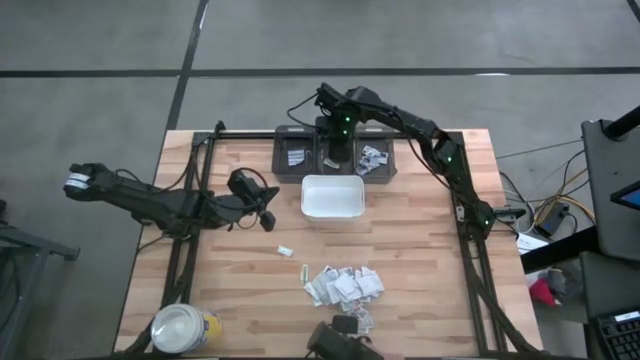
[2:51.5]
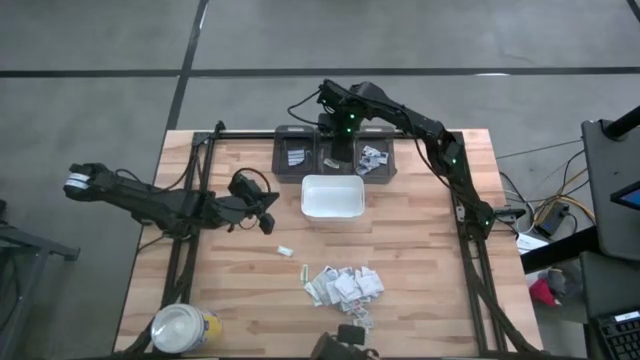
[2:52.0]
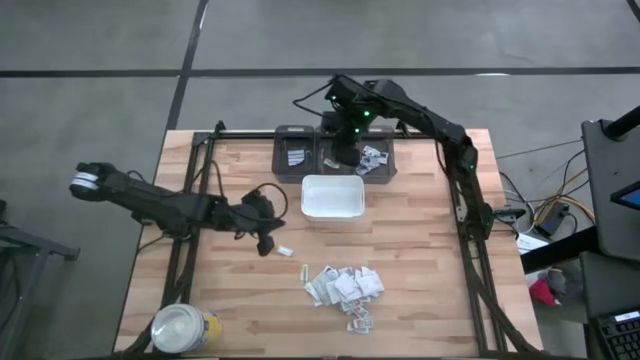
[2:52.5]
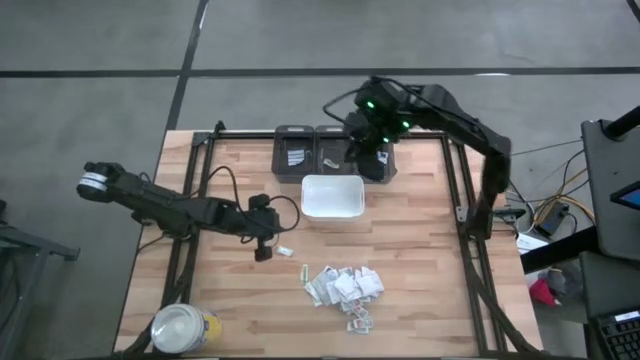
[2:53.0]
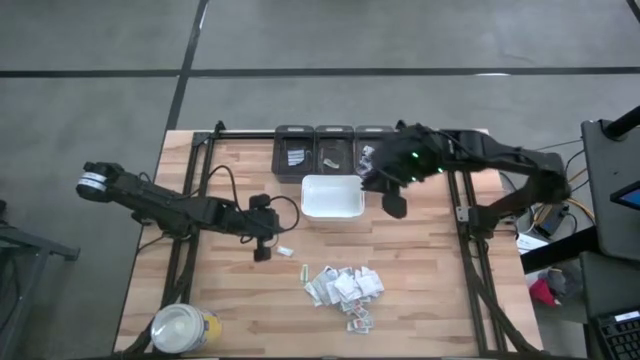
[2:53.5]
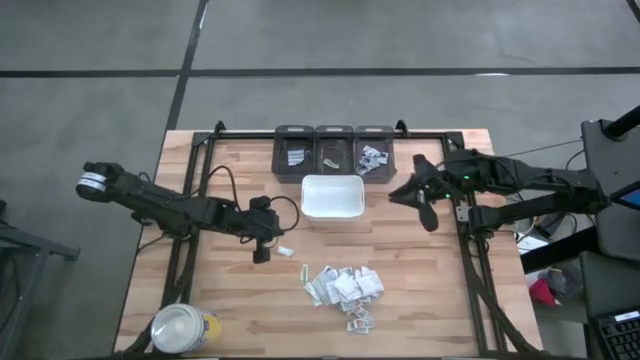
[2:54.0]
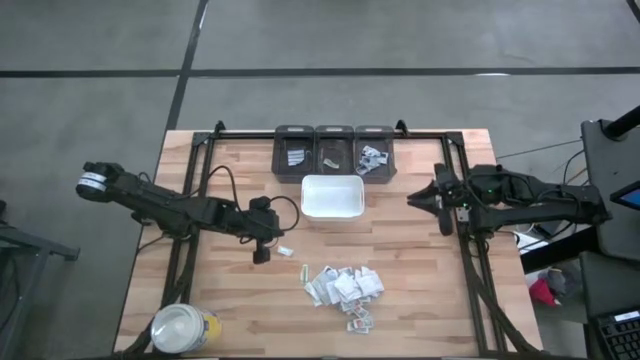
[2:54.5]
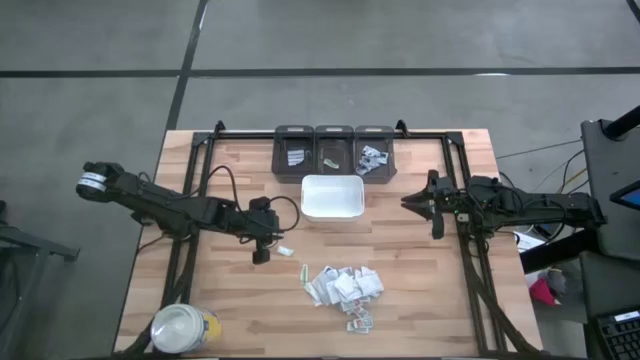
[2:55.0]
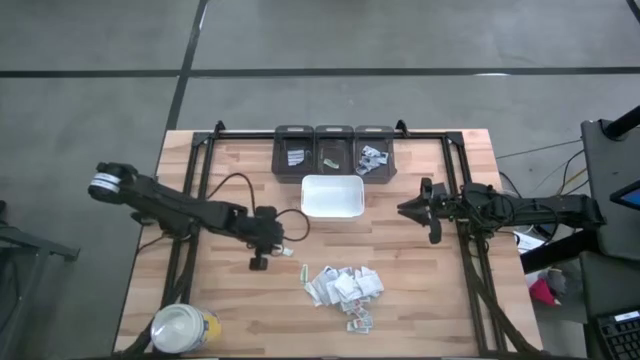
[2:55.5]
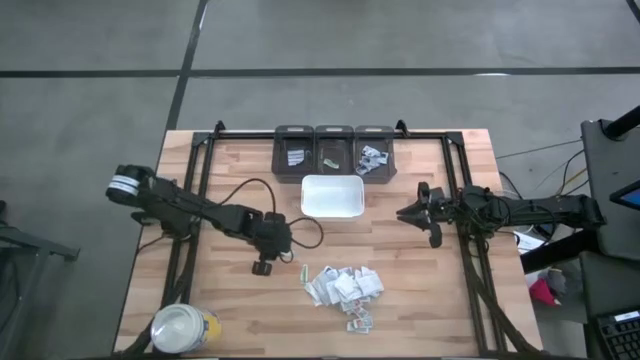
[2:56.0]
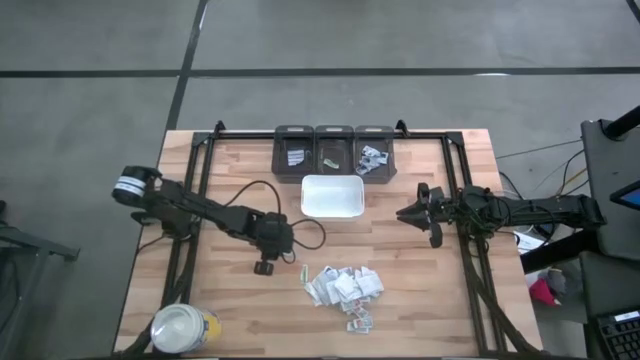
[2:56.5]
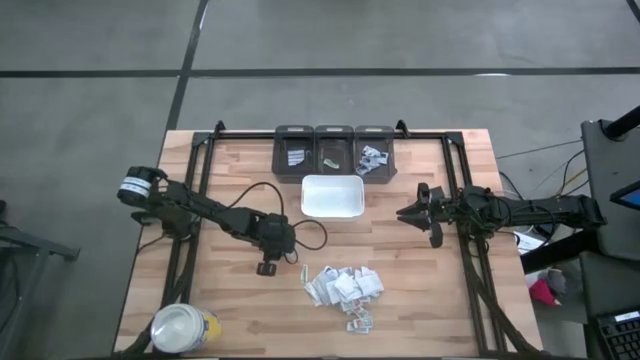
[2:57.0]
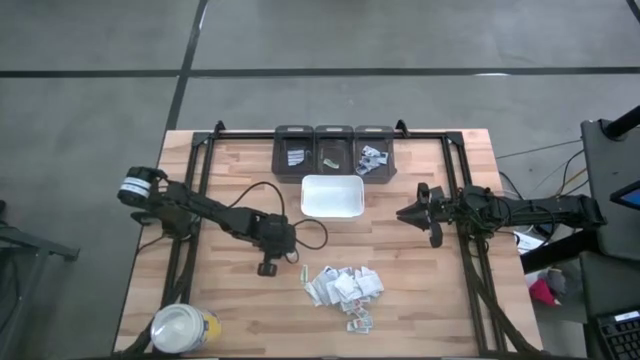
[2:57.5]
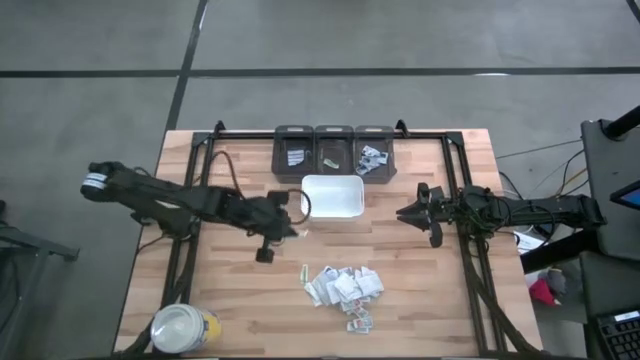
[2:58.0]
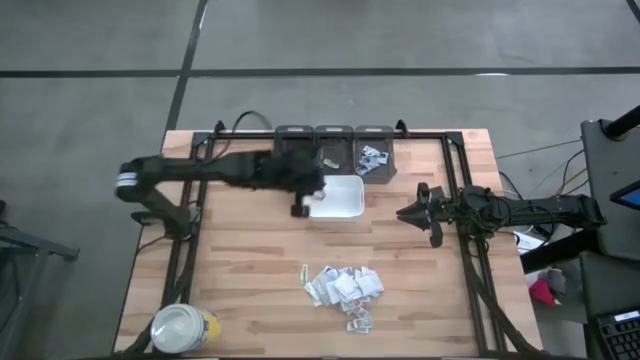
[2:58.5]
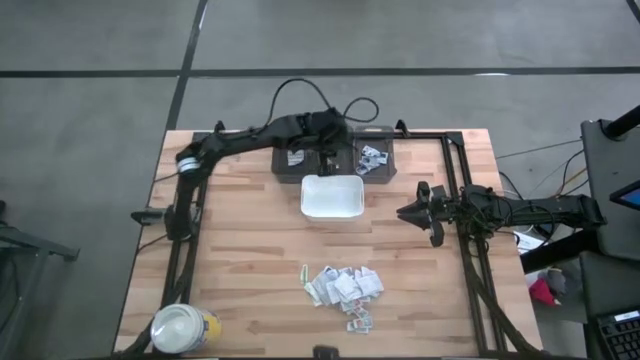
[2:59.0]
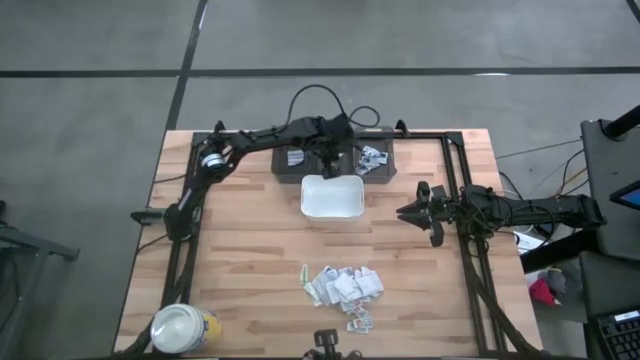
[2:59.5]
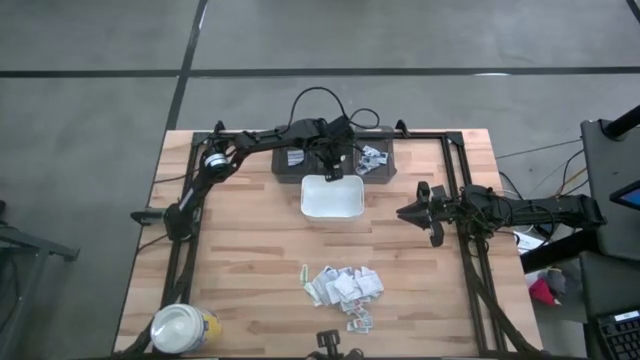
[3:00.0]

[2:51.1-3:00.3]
Task: Pick & Place First Aid Supplies
Put the green band aid into the middle black bin

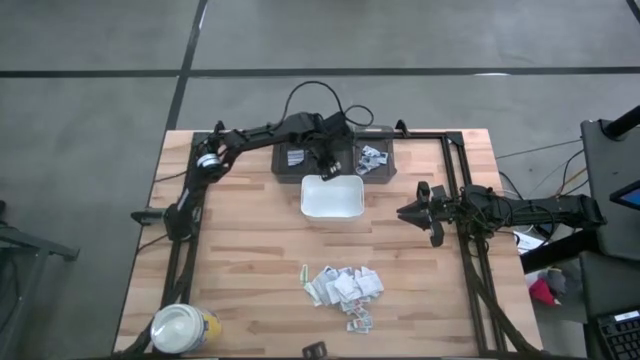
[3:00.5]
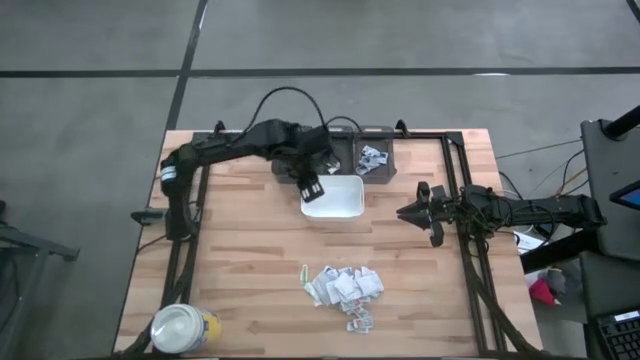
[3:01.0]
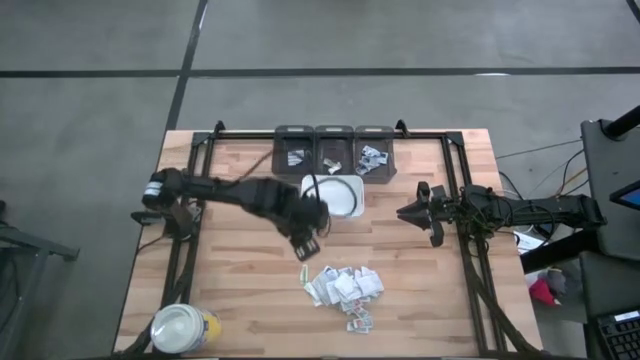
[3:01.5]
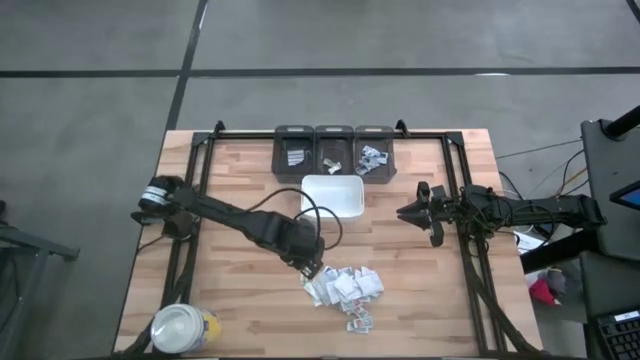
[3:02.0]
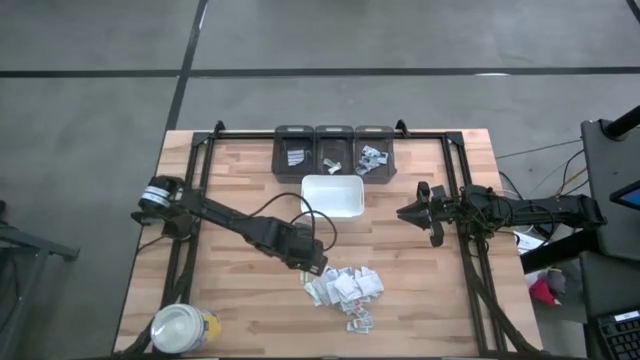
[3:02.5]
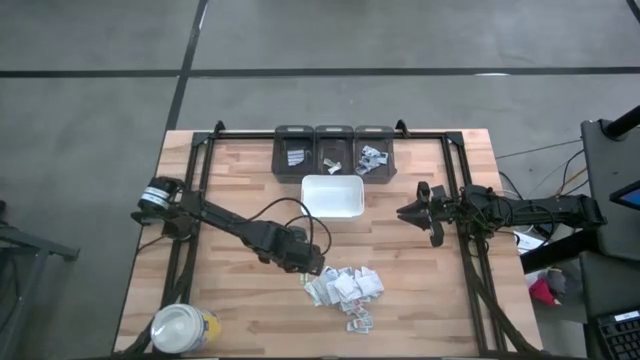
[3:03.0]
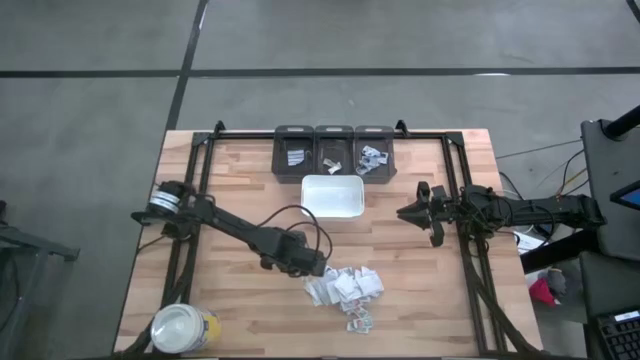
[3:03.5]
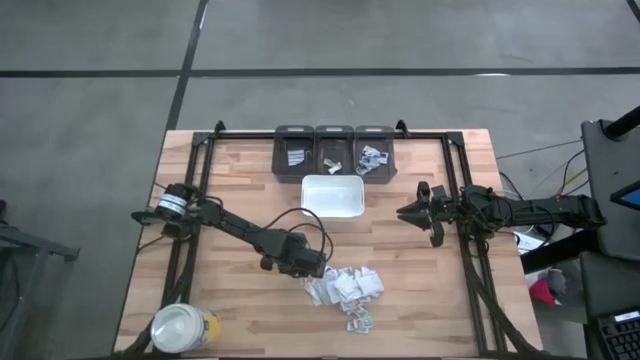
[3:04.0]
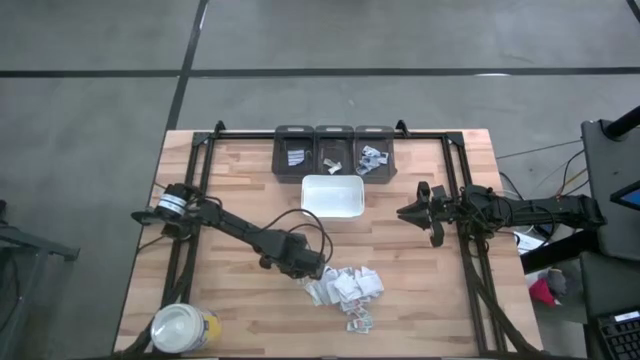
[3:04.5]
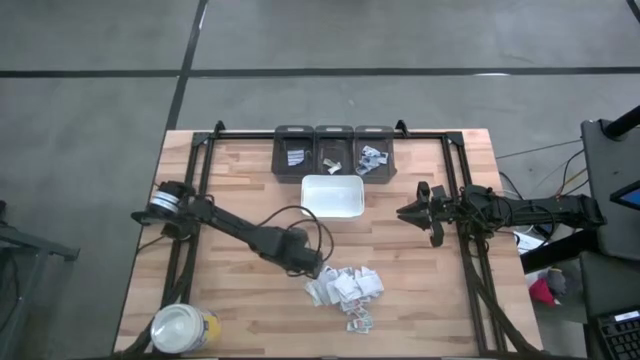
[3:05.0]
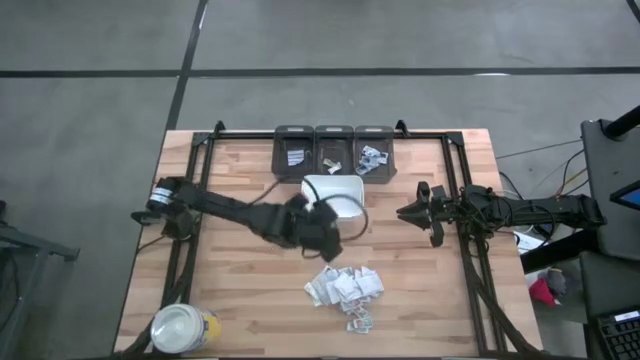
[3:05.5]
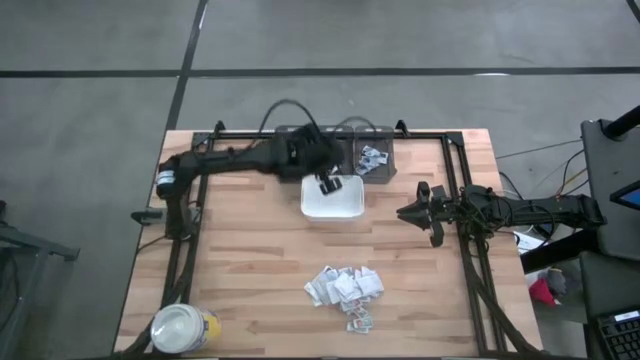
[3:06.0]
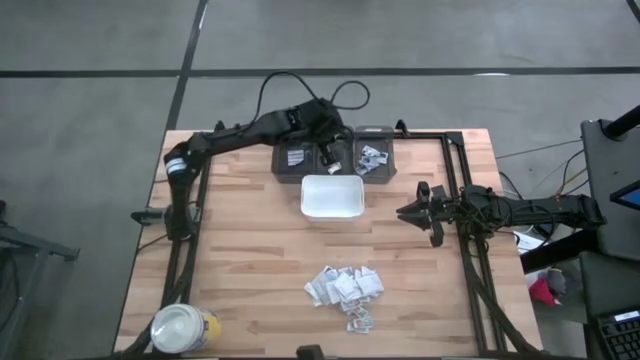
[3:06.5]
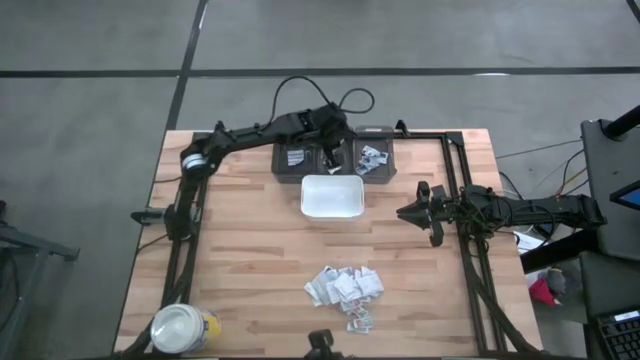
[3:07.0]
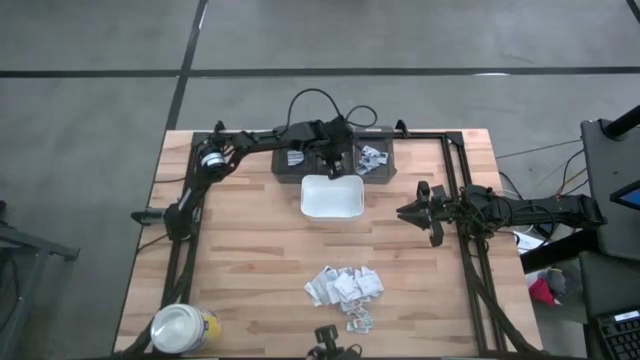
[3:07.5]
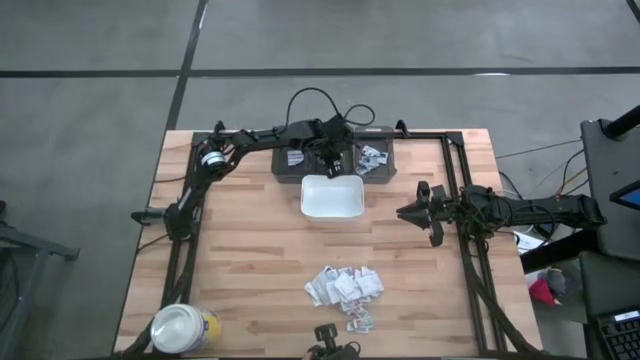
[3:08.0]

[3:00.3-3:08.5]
Put the green band aid into the middle black bin

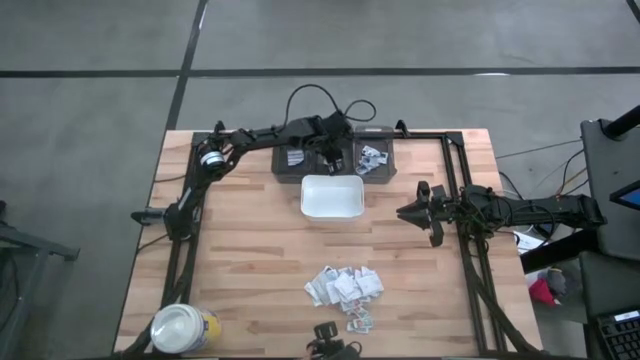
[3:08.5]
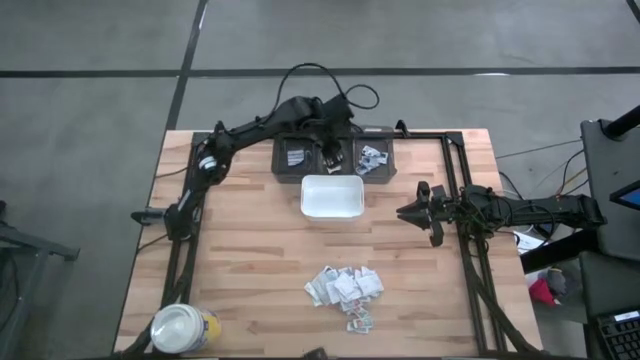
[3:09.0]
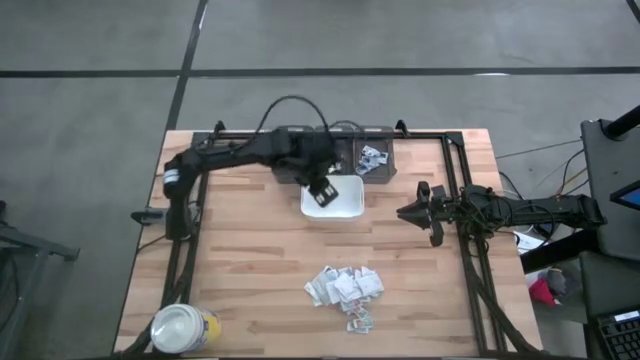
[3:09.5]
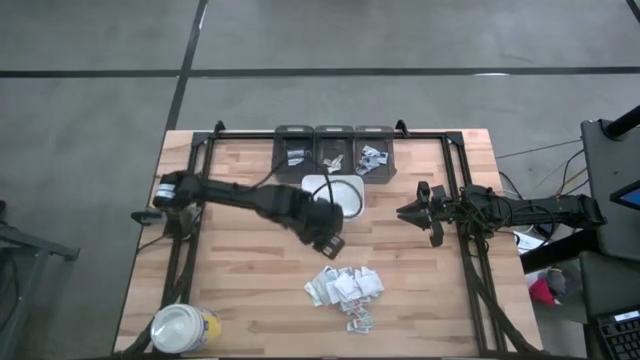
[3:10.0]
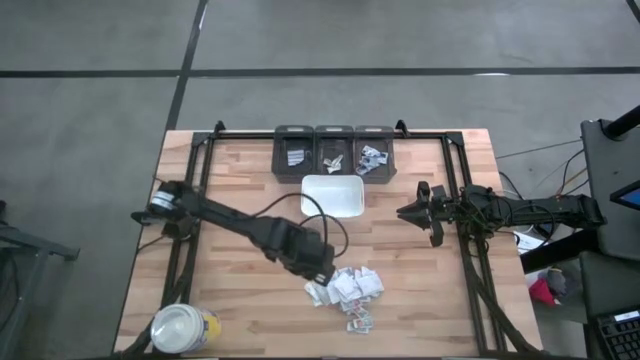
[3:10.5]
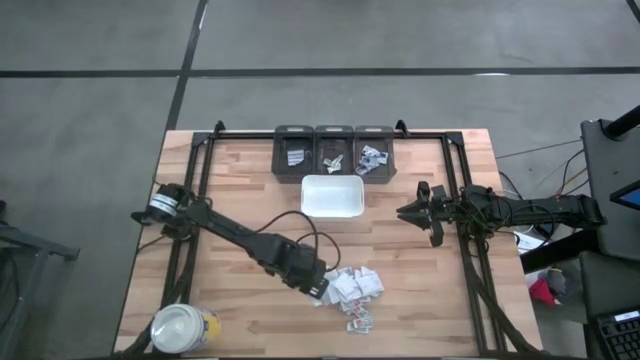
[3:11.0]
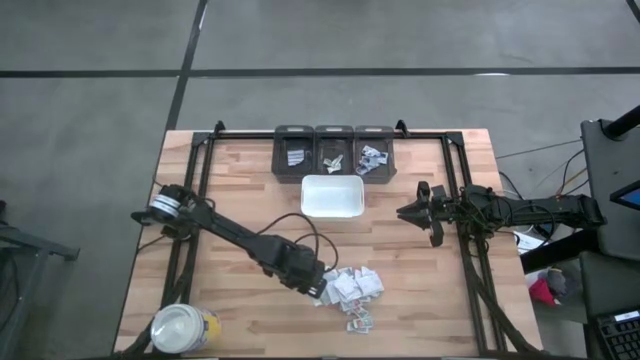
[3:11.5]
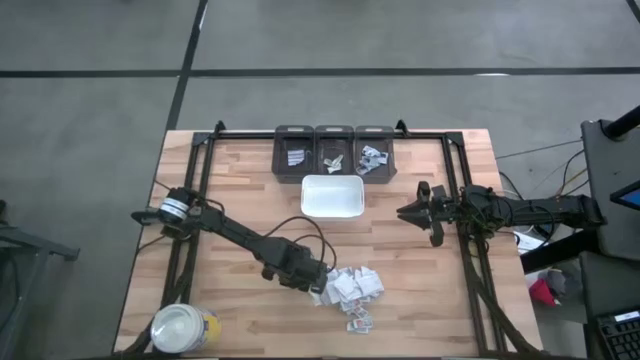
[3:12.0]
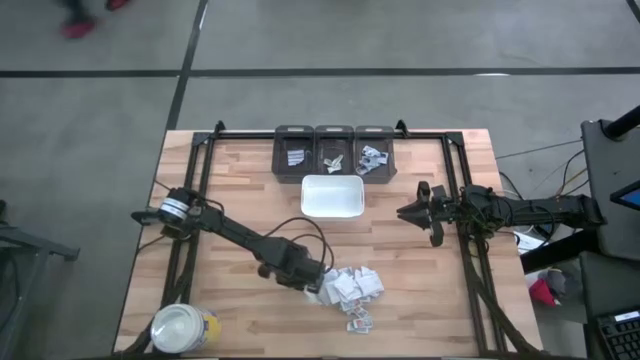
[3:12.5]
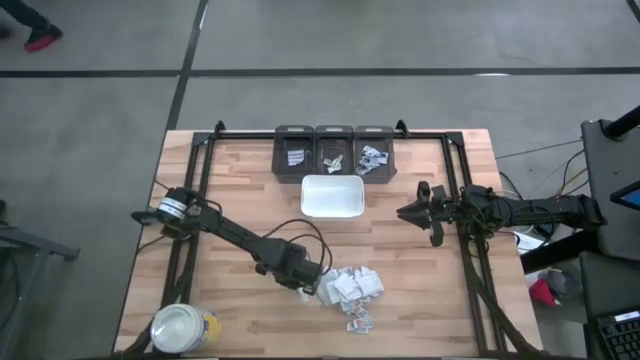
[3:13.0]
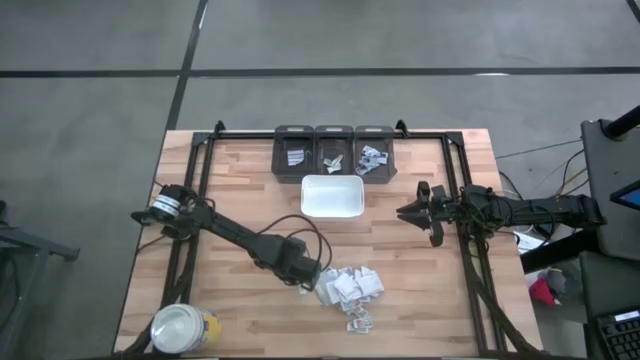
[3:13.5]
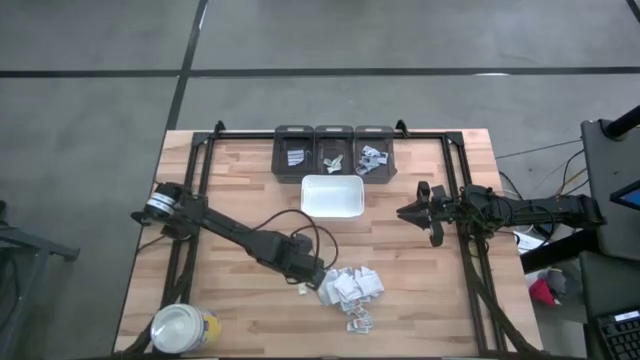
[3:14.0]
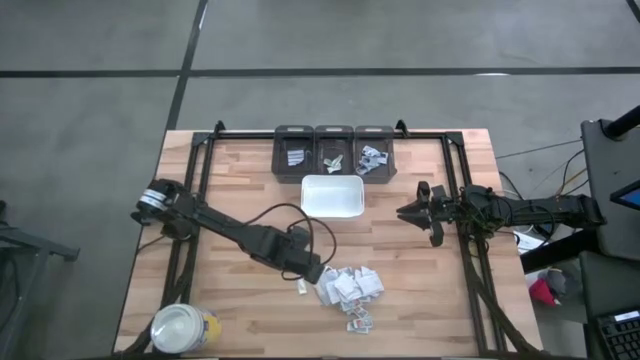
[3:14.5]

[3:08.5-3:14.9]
Put the green band aid into the middle black bin
